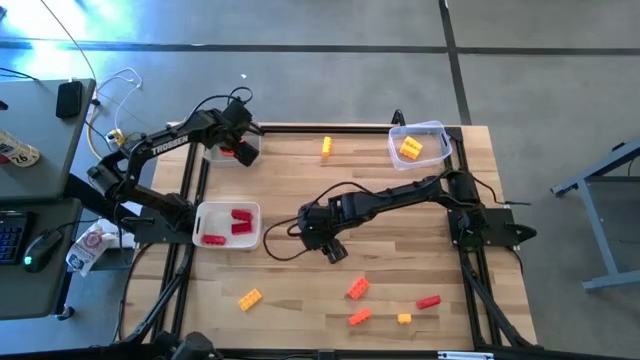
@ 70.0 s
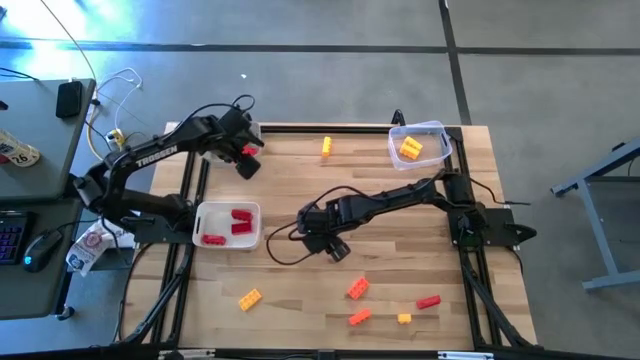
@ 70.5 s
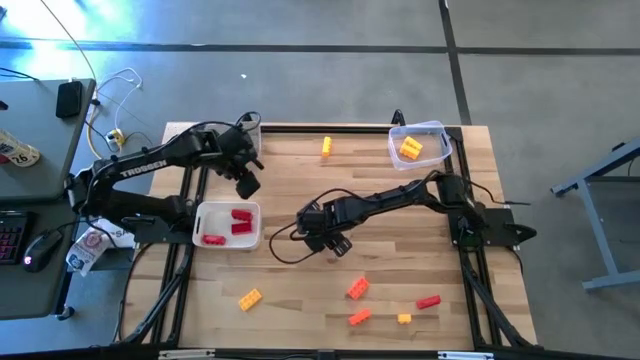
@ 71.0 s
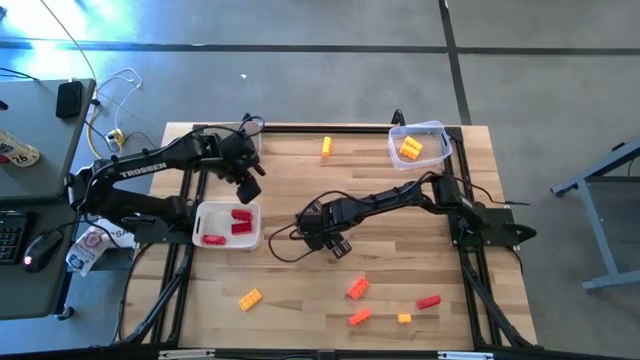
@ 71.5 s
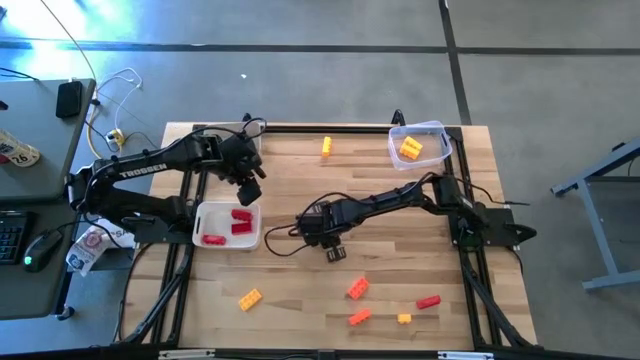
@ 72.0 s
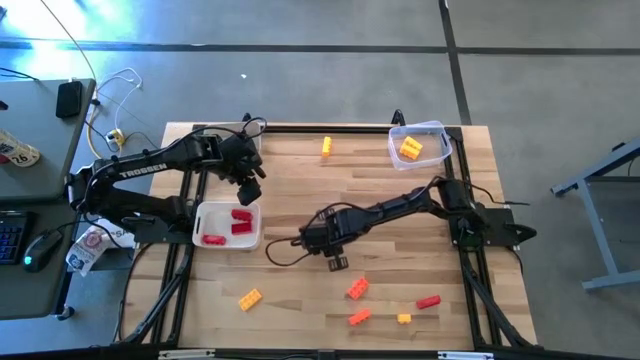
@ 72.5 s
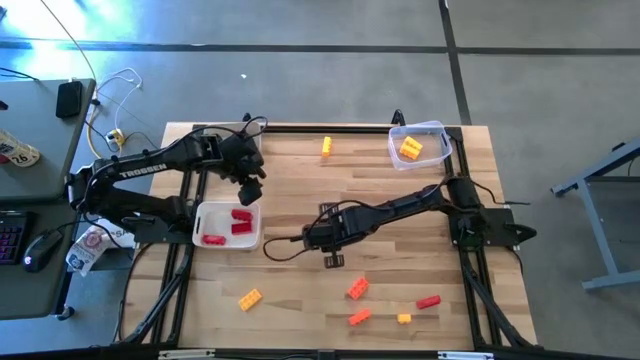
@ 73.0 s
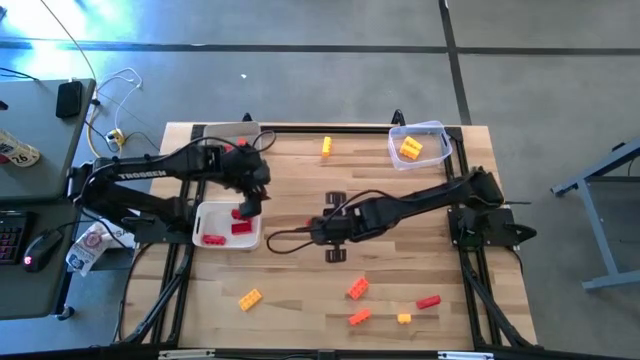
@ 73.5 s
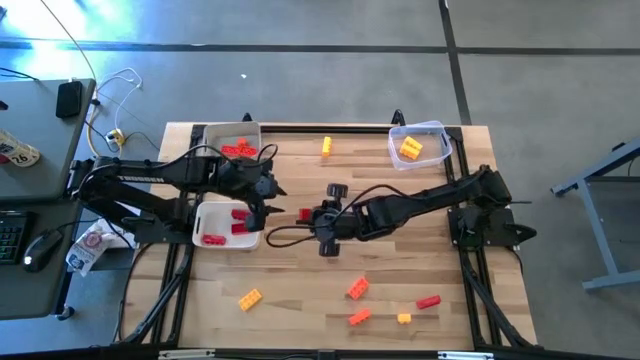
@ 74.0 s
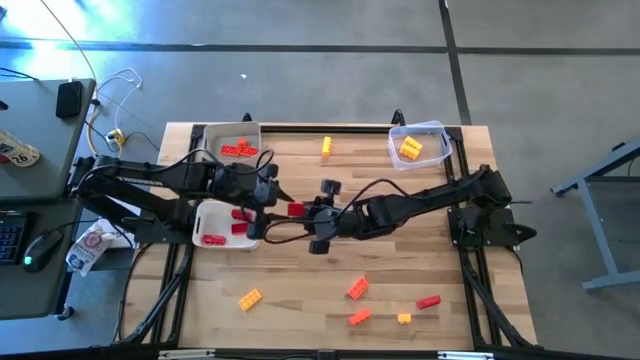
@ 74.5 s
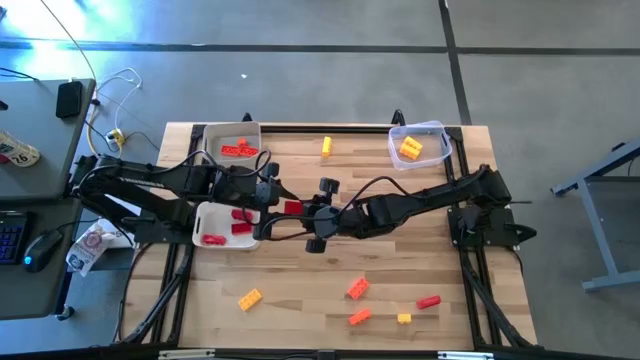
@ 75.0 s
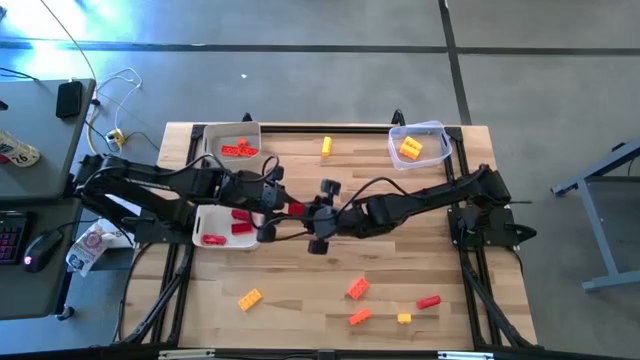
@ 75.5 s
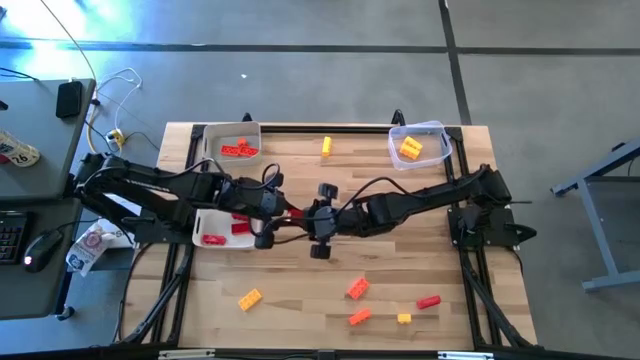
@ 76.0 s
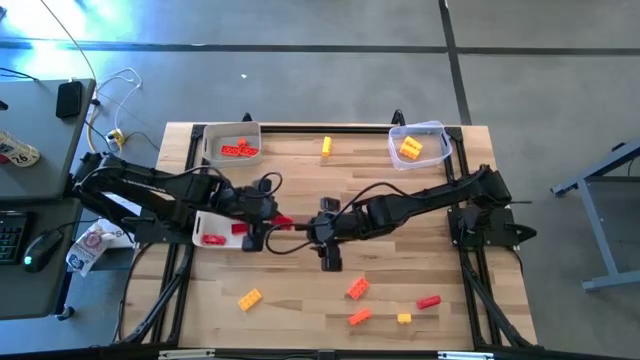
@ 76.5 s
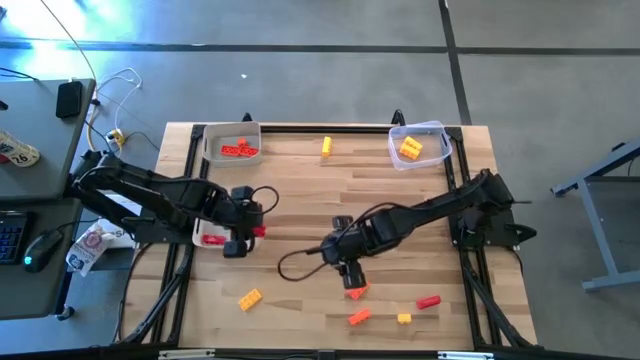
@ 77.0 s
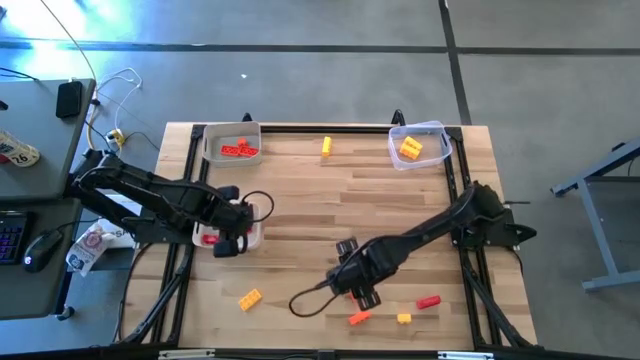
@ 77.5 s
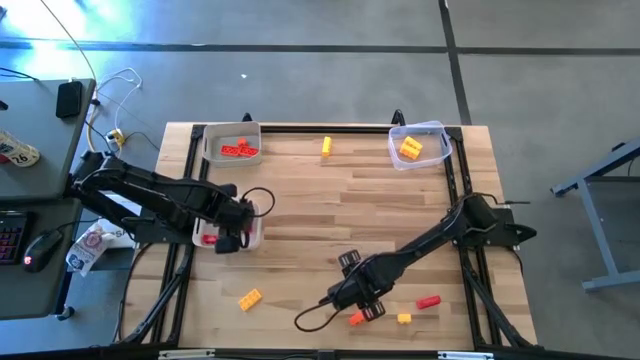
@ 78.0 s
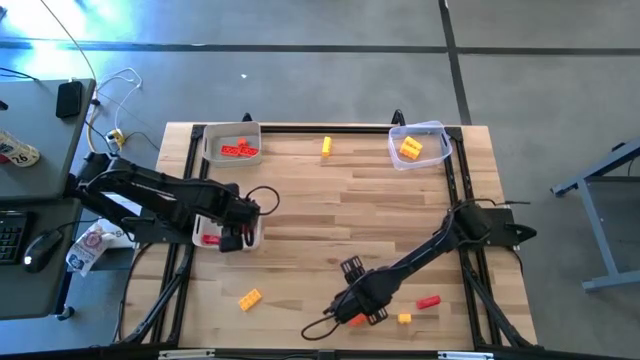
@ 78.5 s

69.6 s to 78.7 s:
Task: Sort & place blocks by color
Put the red game piece into the white bin

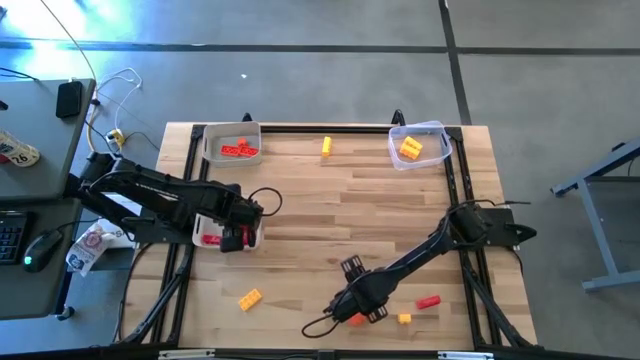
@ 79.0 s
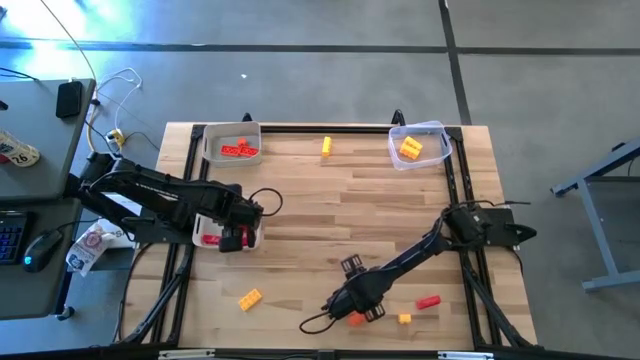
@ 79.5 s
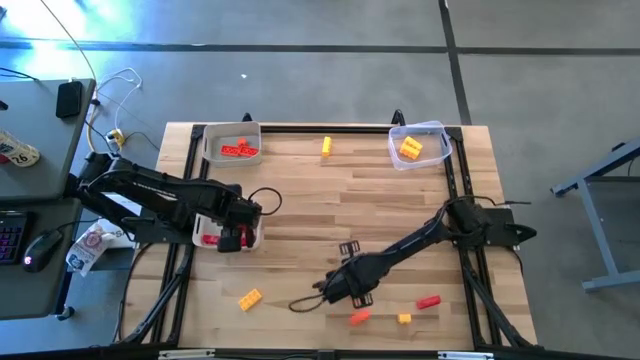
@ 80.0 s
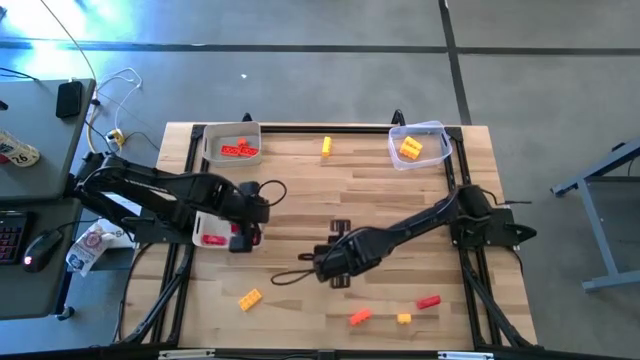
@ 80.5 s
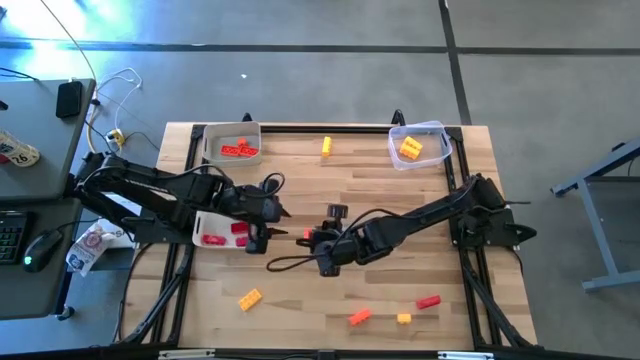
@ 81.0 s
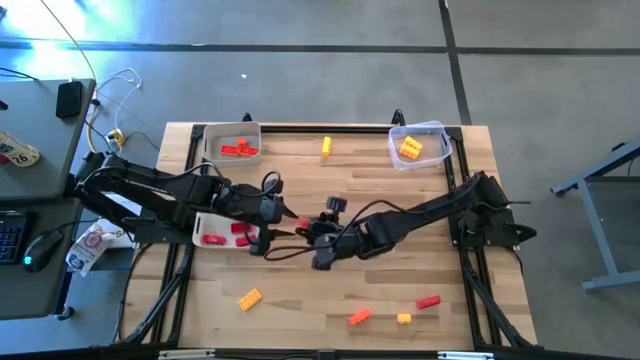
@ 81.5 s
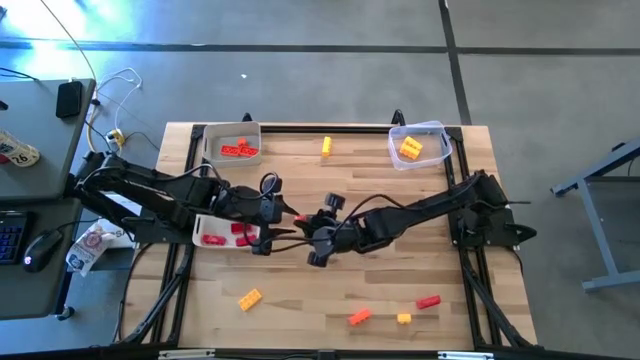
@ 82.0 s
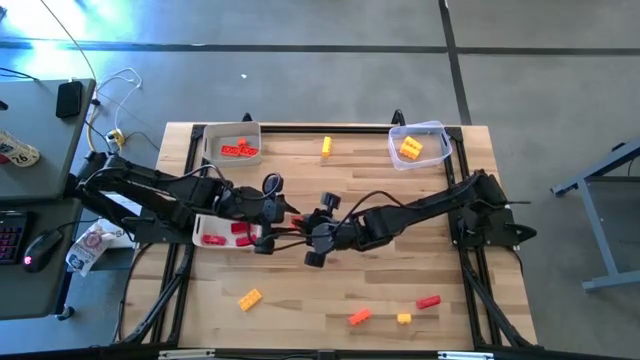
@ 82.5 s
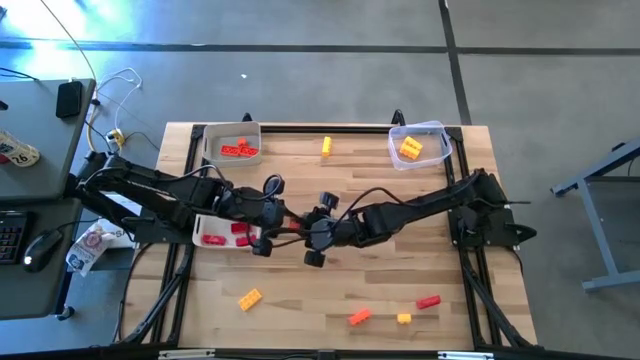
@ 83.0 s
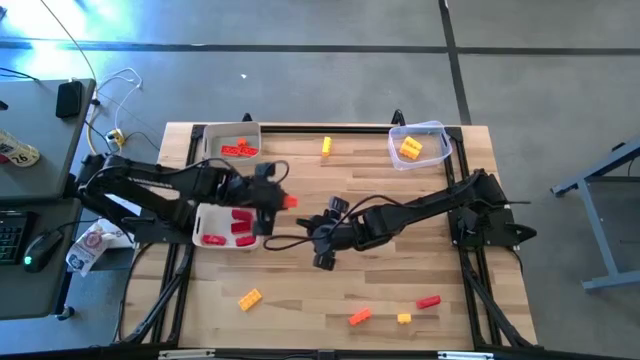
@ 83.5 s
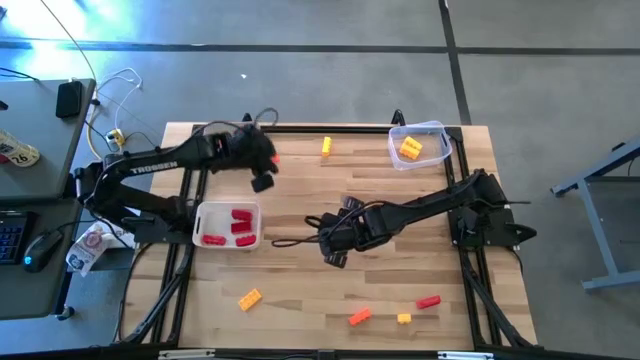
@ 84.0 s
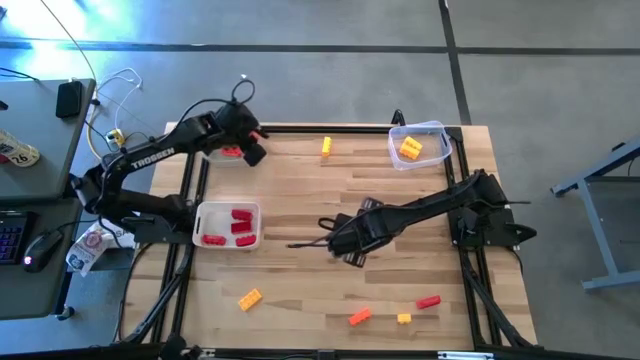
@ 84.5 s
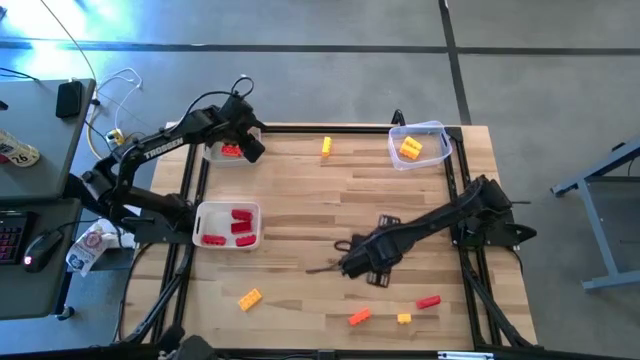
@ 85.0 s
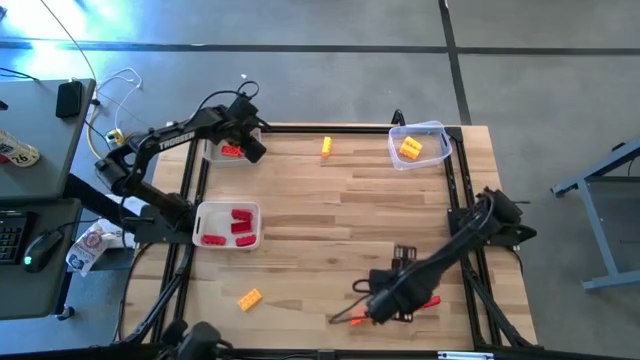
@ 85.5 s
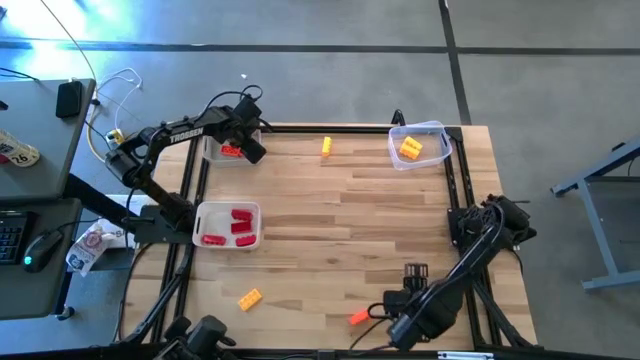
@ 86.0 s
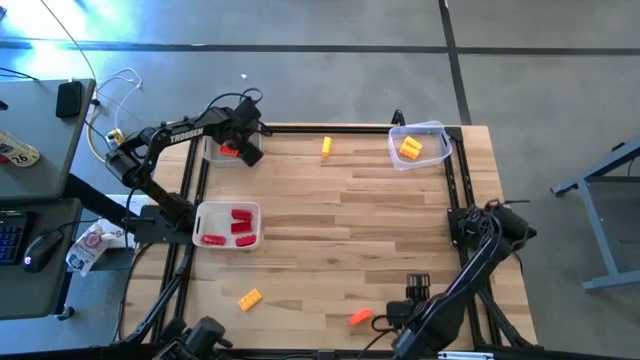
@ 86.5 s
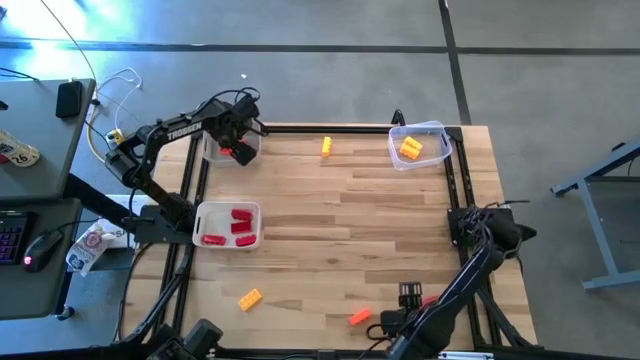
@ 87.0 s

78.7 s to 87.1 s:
Put the orange game piece into the gray bin

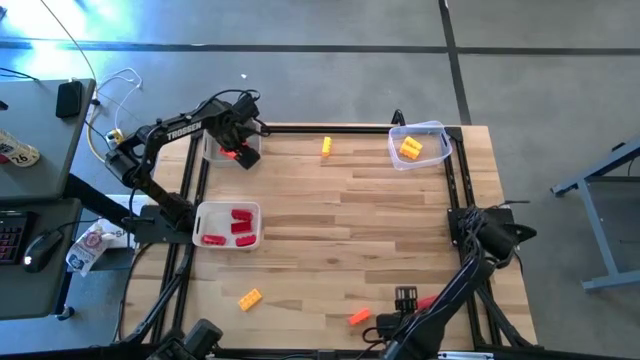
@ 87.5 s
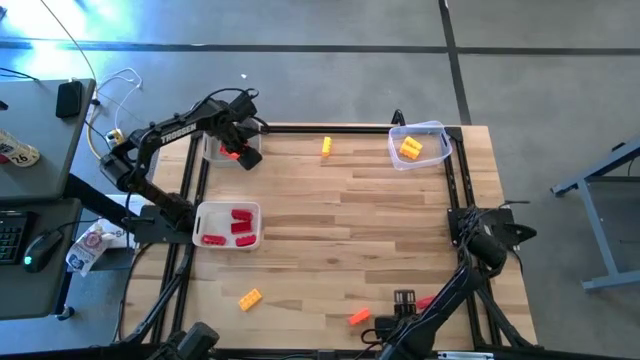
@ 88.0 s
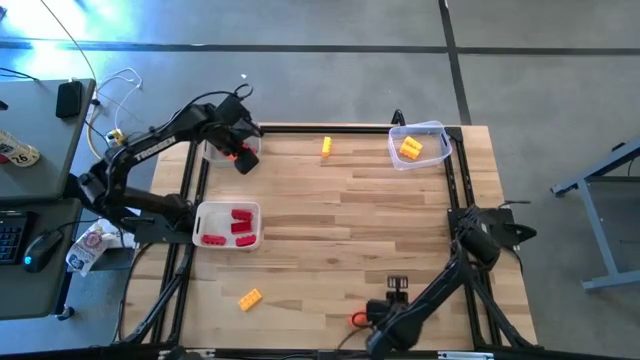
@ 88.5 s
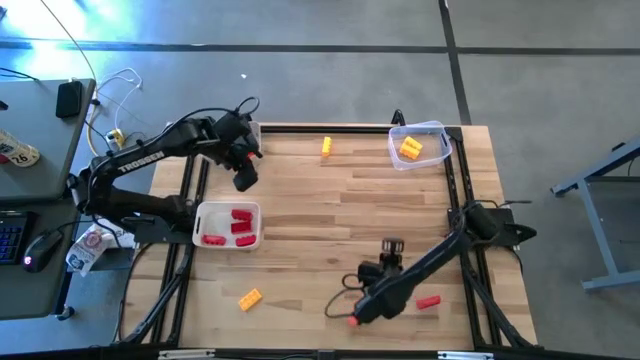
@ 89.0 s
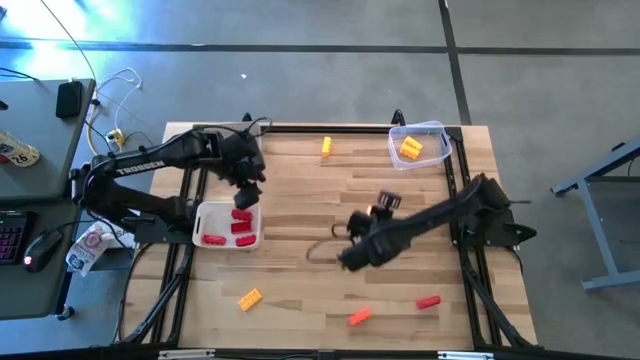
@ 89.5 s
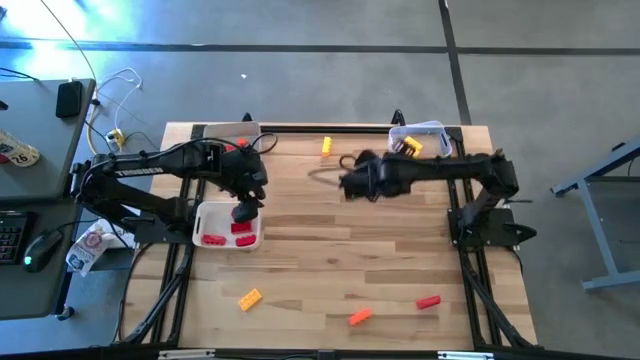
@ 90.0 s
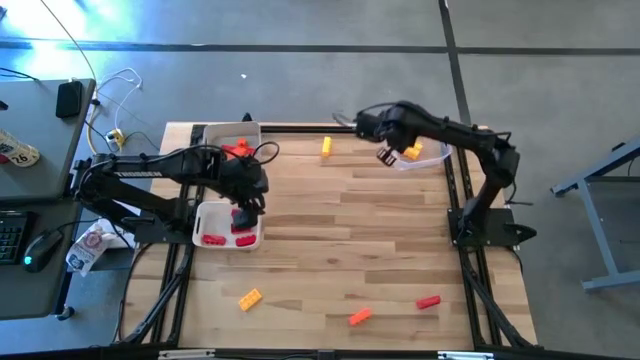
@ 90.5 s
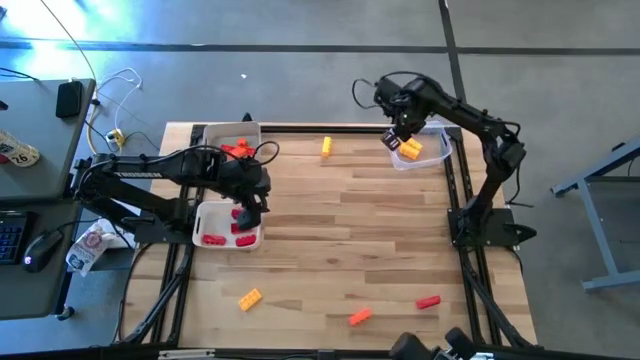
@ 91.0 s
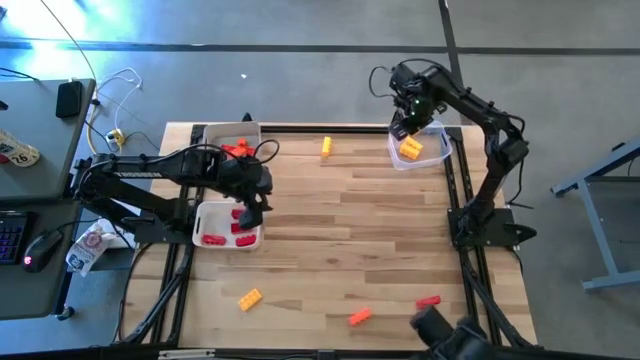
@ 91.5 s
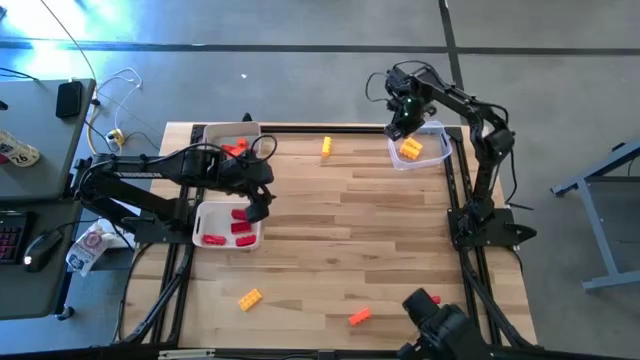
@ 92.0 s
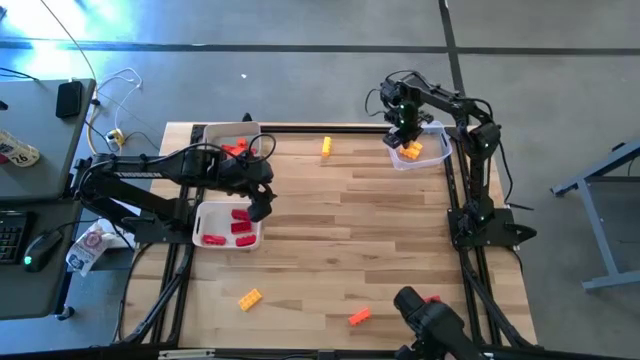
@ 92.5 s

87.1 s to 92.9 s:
Put the yellow game piece into the transparent bin
